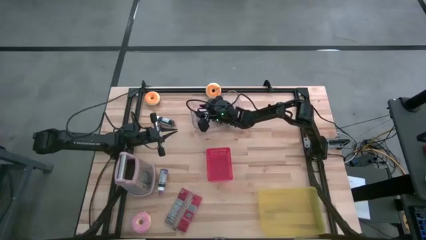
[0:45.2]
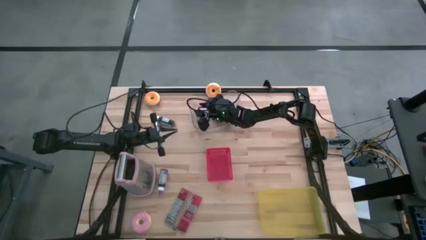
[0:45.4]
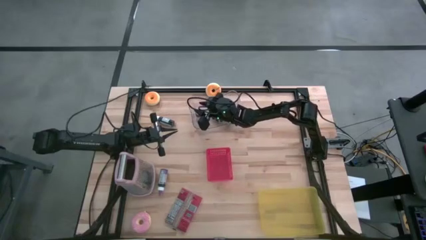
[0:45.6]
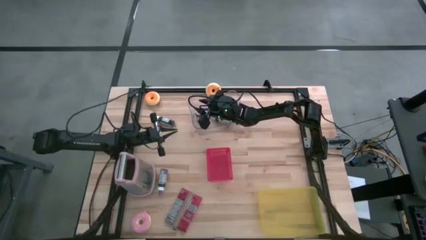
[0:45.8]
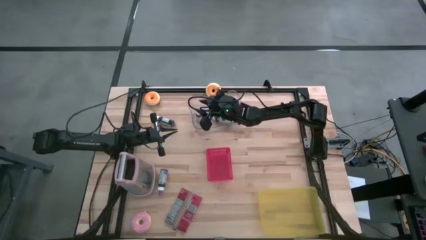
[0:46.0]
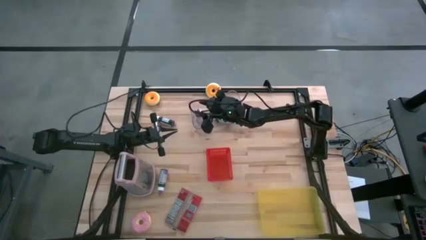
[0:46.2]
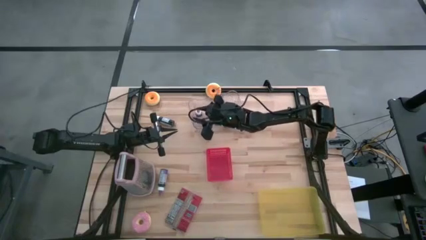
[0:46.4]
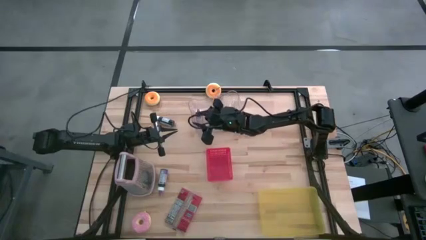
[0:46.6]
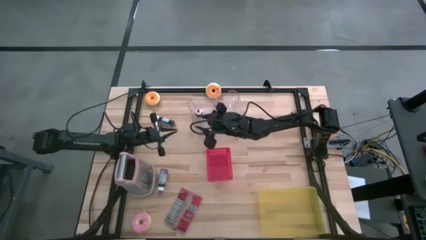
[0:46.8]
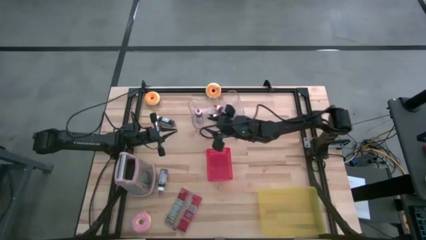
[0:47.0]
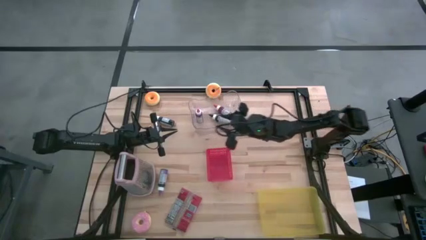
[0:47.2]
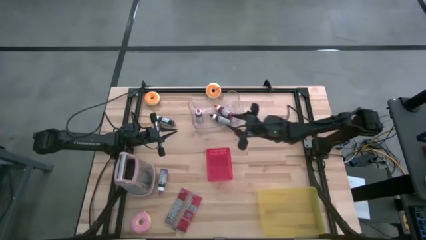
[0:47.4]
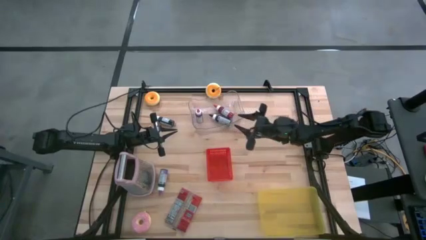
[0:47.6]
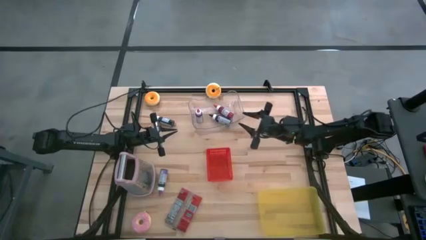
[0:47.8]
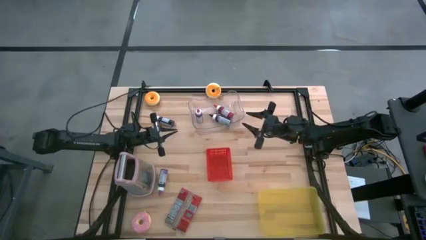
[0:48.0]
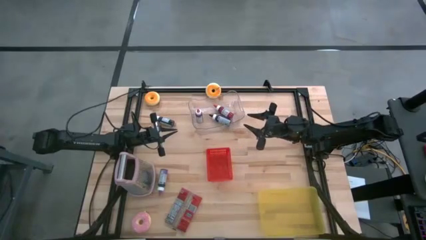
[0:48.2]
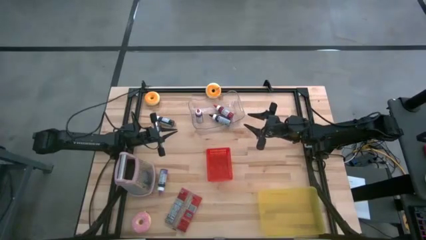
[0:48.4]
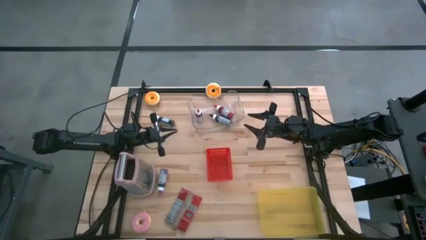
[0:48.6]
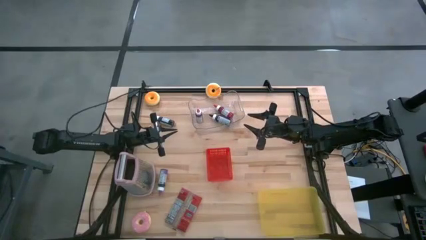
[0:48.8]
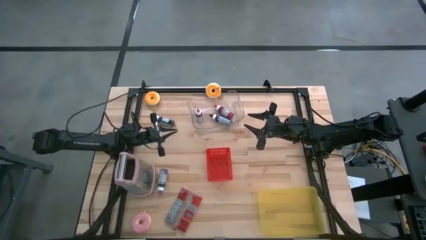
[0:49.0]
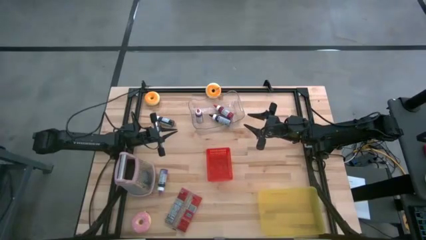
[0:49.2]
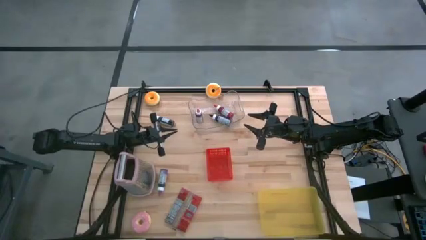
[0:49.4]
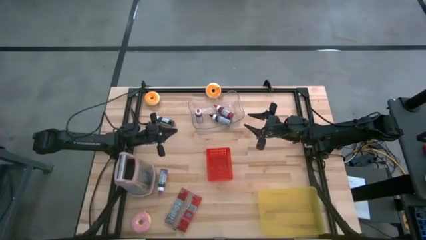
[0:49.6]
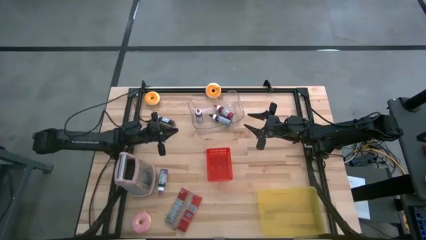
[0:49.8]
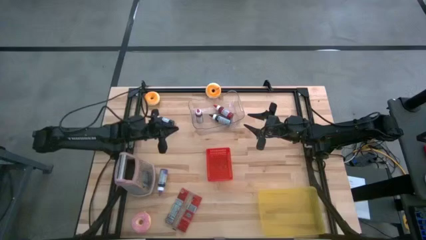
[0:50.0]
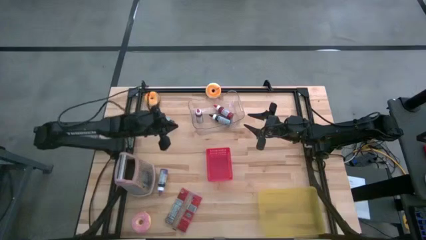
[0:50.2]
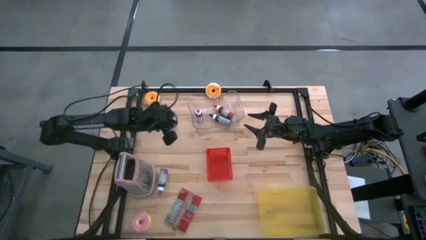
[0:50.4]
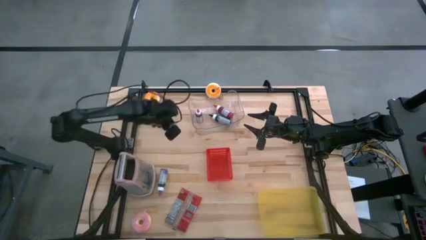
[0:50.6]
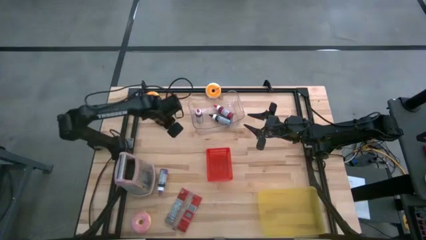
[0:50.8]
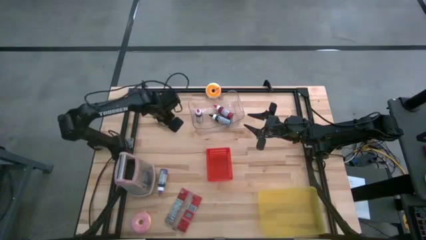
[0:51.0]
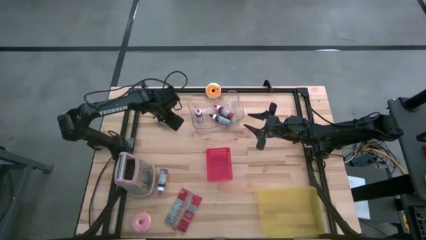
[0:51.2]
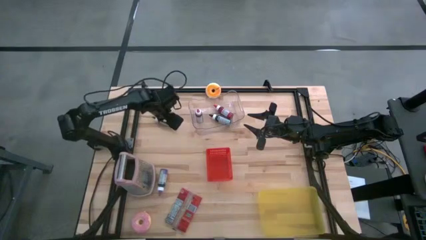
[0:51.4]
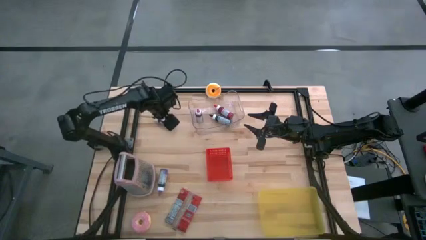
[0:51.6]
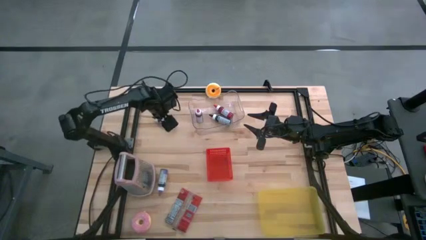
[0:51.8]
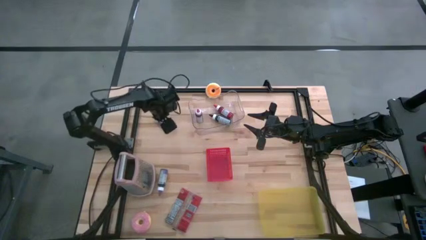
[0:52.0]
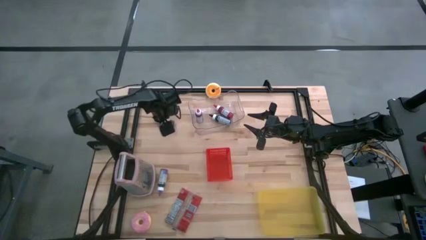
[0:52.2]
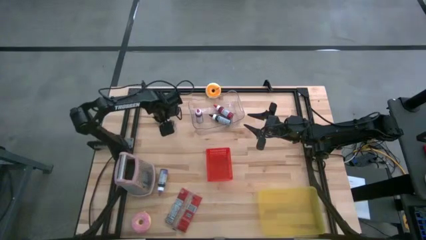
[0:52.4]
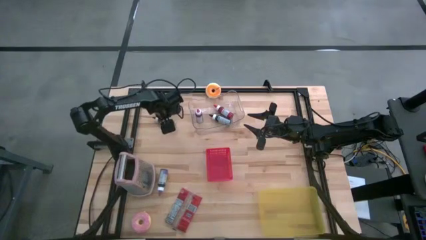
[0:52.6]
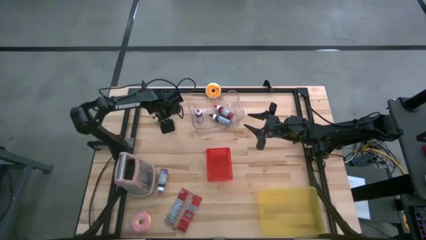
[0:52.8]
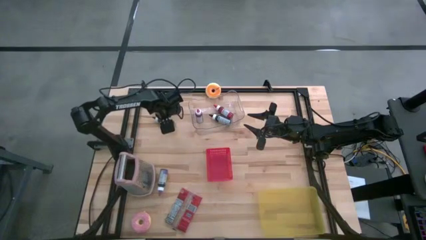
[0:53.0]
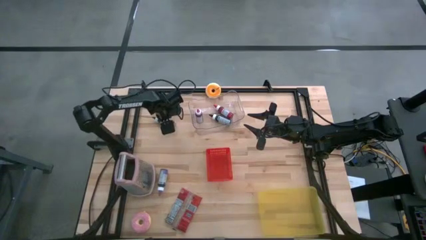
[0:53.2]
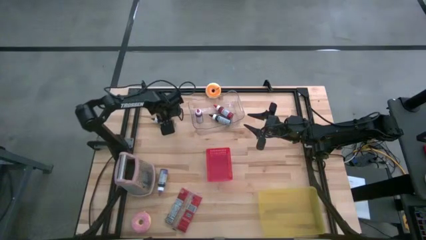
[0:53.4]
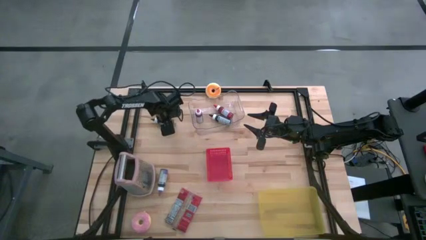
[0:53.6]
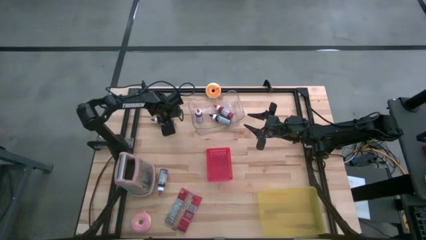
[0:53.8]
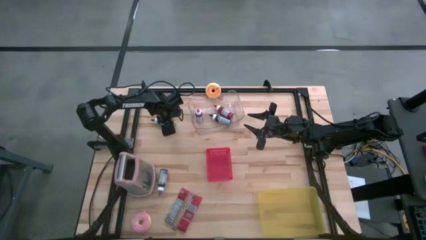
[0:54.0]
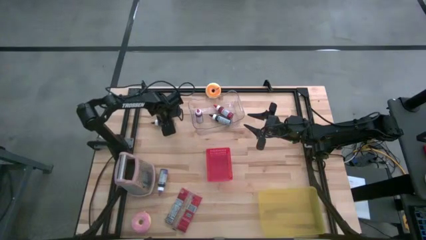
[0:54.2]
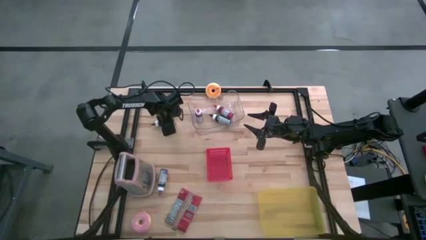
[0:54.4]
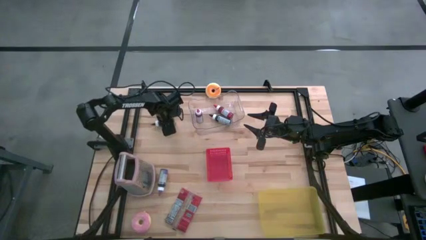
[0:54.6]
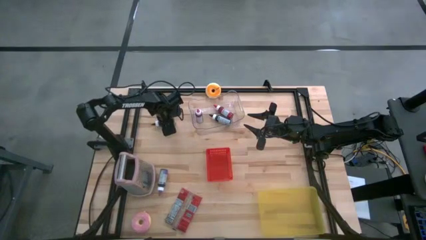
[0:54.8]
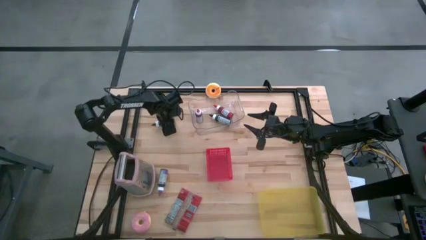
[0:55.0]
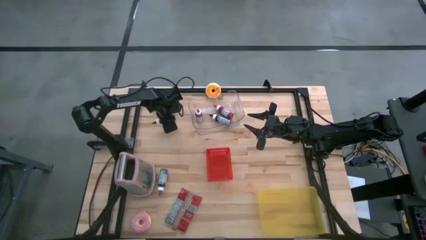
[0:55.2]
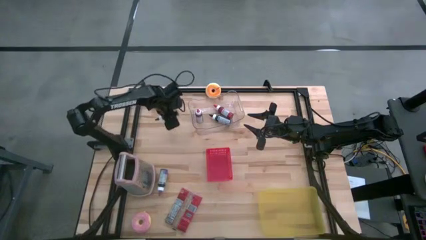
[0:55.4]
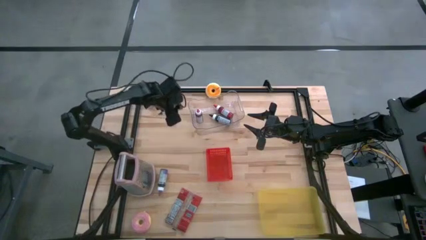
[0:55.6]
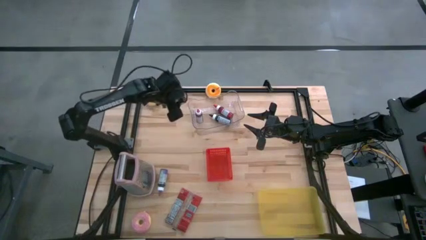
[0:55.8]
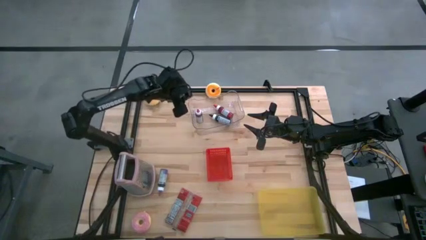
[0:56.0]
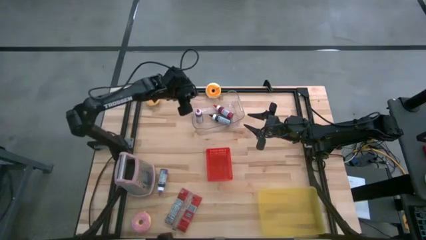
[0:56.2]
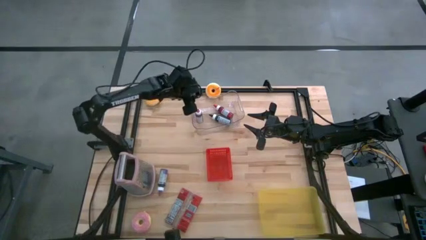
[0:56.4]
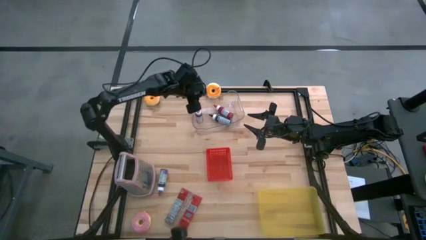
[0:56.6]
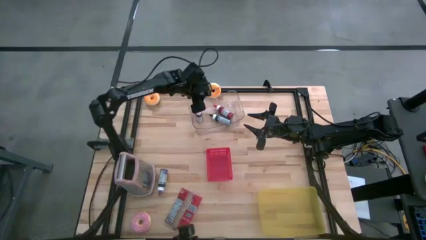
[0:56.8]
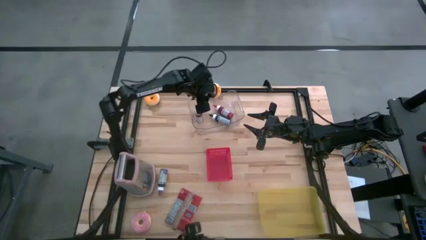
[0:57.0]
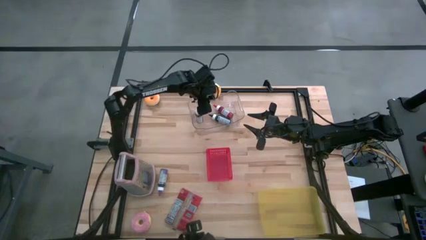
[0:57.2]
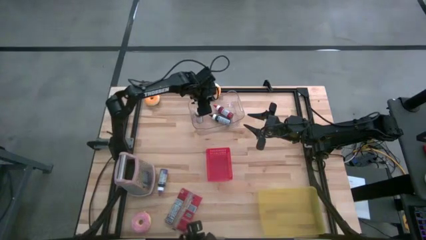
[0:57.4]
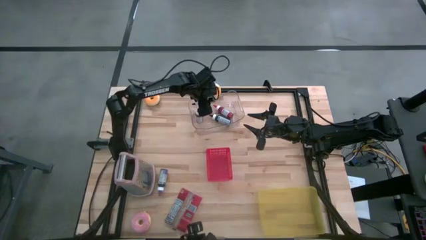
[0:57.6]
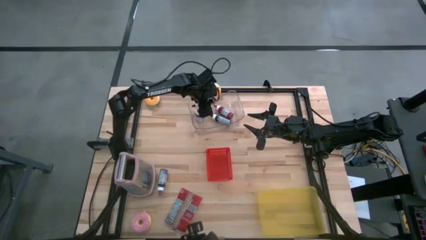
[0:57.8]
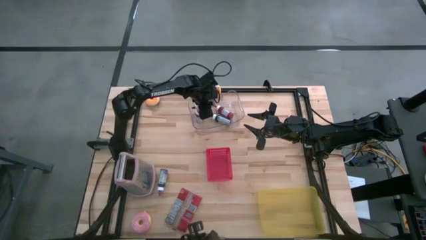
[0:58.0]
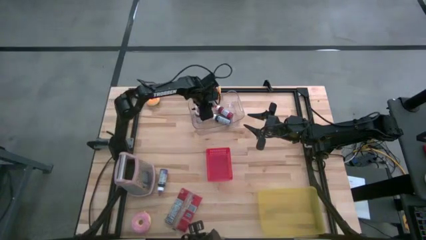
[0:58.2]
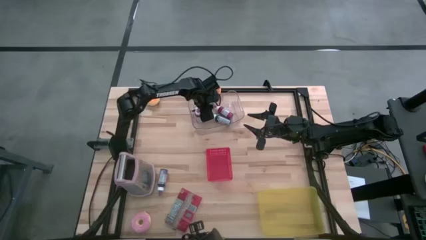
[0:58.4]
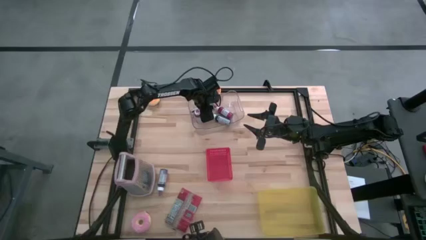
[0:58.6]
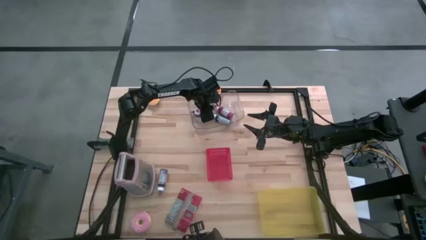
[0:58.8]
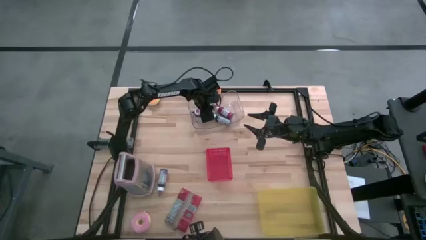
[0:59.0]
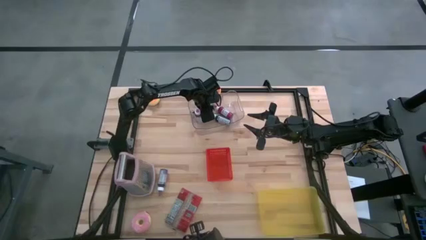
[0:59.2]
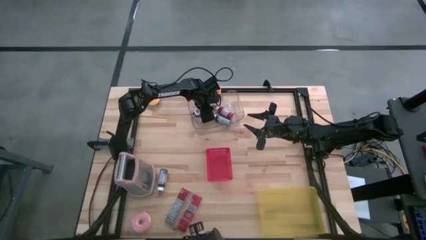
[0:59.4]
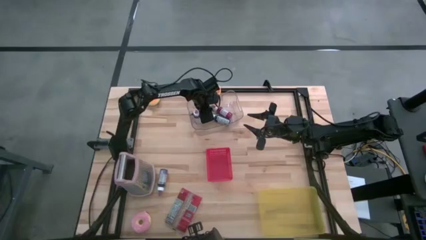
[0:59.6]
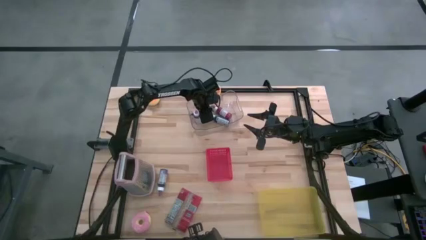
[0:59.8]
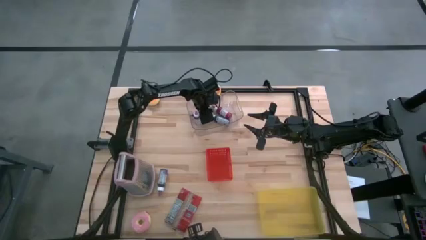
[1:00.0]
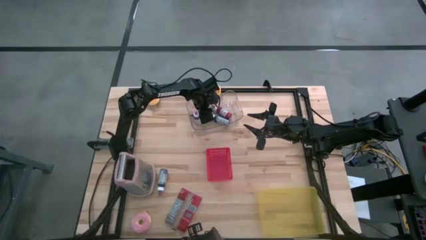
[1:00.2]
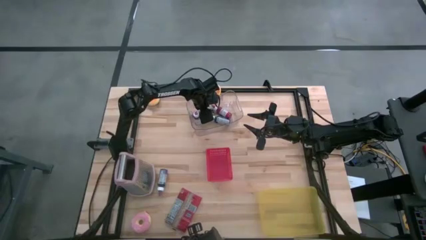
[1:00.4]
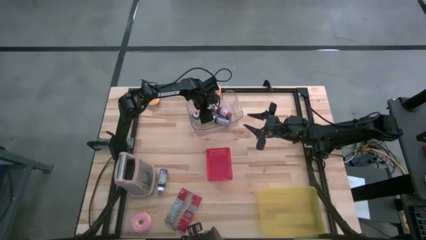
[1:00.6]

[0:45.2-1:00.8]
Task: Pick & Place Food Item
Put the black food coloring bottle into the transparent bin
